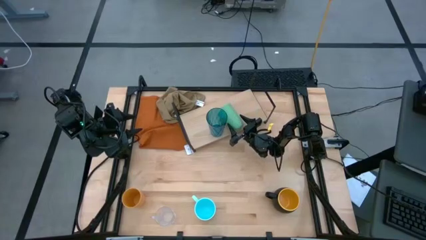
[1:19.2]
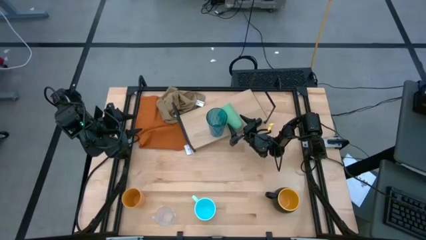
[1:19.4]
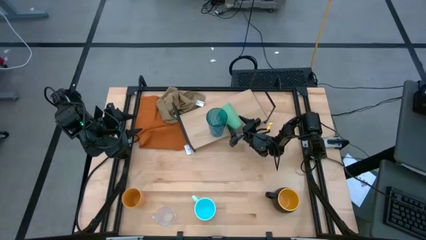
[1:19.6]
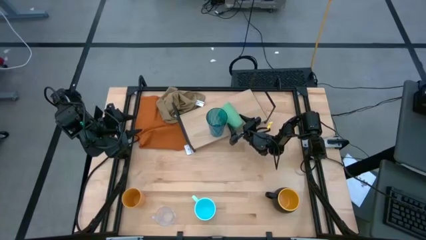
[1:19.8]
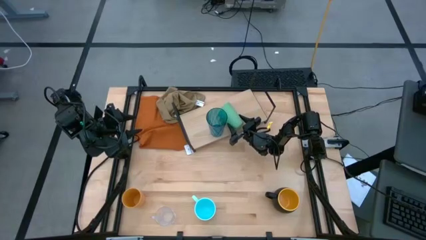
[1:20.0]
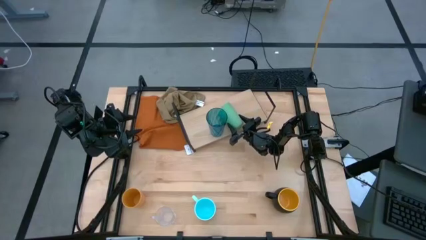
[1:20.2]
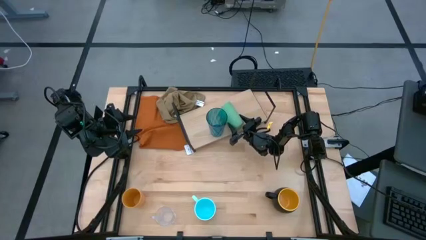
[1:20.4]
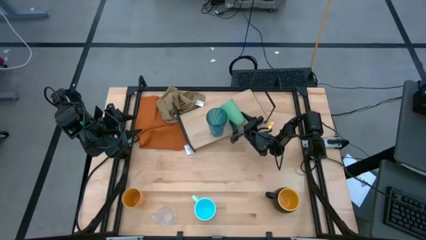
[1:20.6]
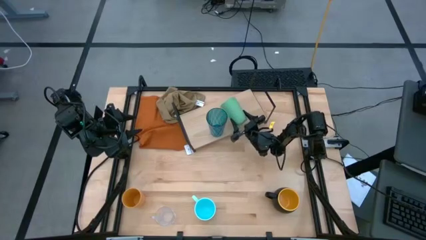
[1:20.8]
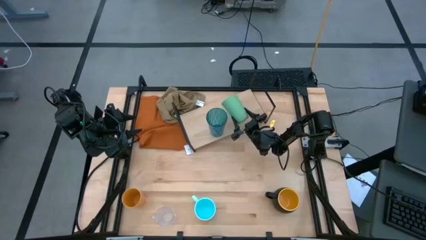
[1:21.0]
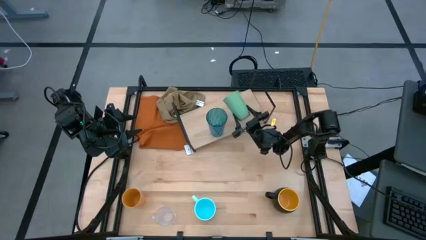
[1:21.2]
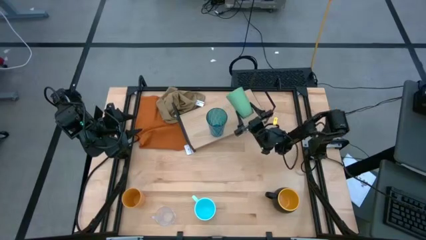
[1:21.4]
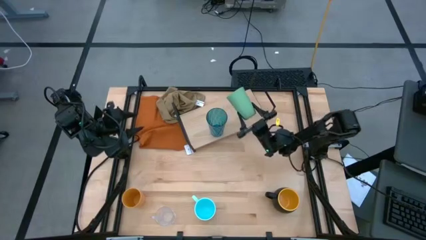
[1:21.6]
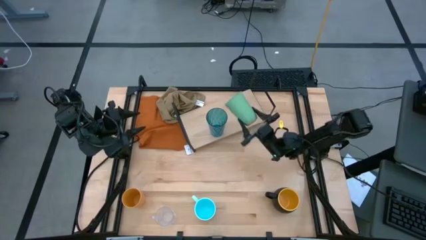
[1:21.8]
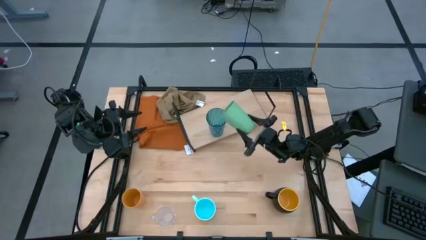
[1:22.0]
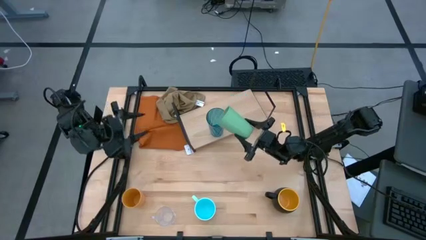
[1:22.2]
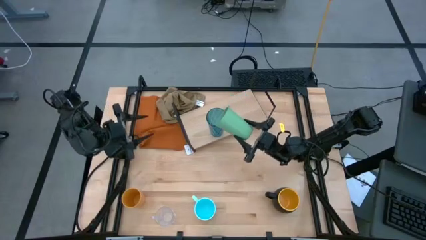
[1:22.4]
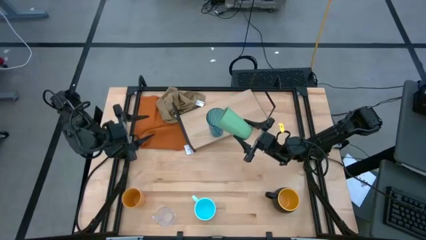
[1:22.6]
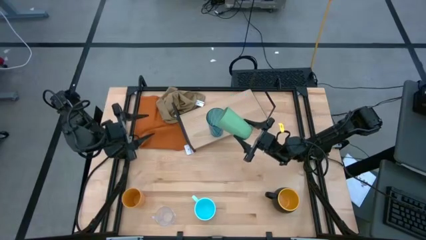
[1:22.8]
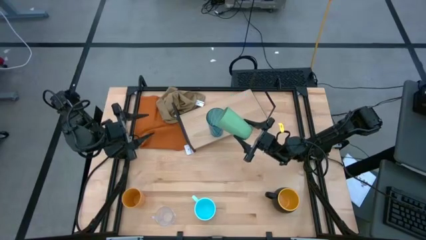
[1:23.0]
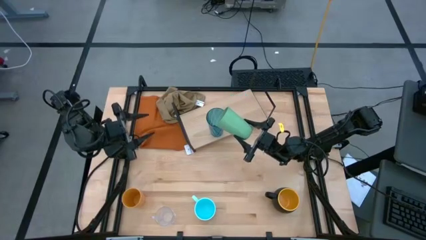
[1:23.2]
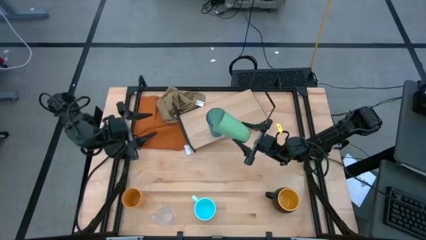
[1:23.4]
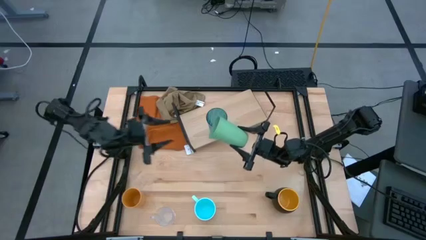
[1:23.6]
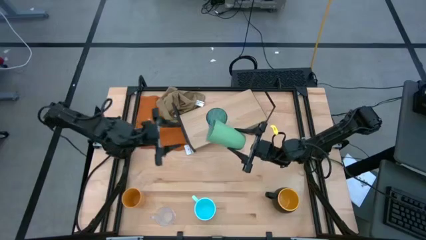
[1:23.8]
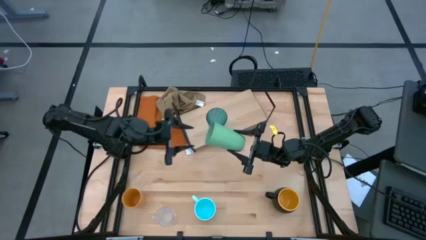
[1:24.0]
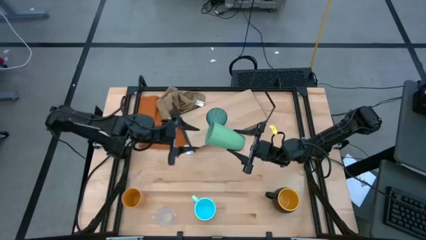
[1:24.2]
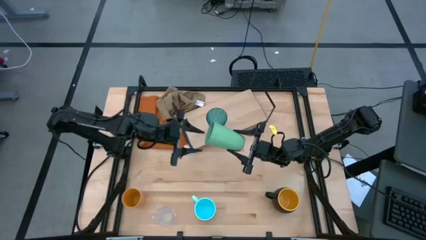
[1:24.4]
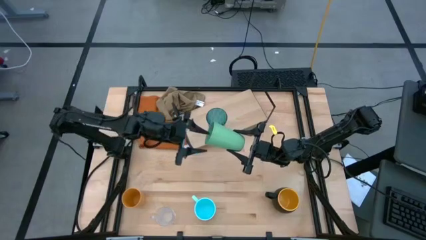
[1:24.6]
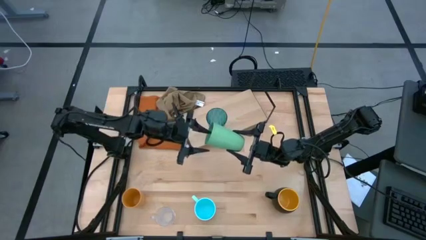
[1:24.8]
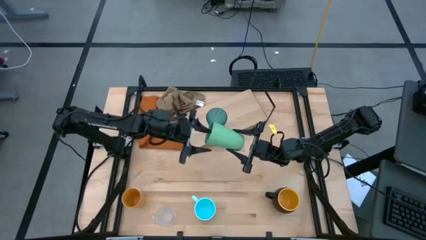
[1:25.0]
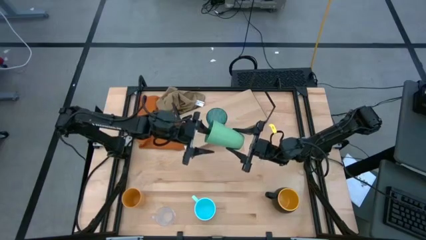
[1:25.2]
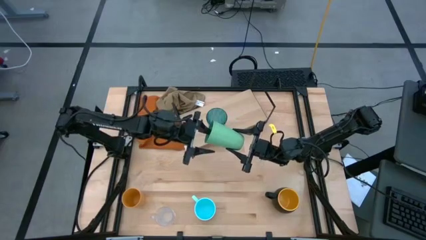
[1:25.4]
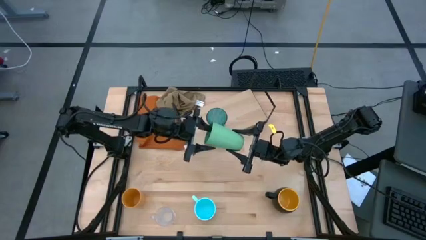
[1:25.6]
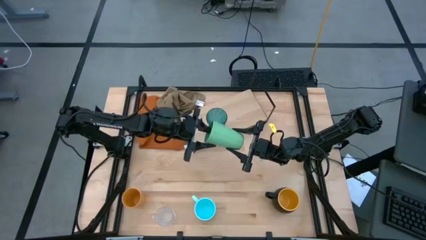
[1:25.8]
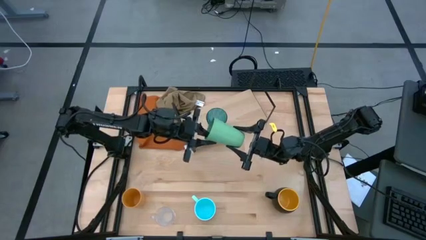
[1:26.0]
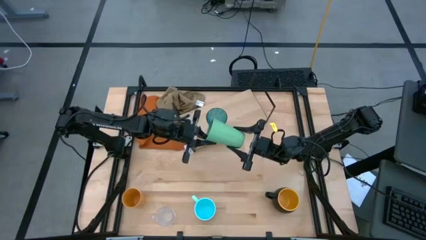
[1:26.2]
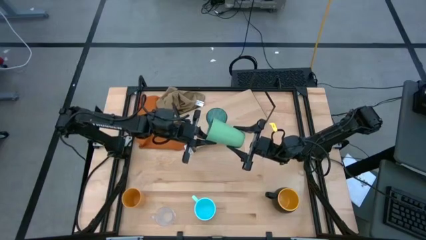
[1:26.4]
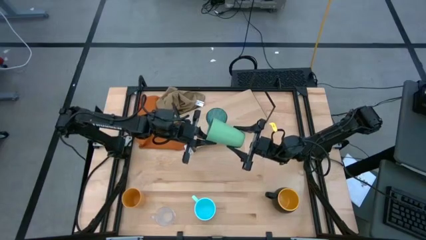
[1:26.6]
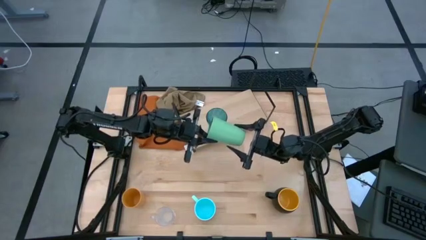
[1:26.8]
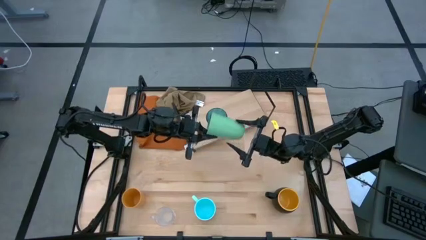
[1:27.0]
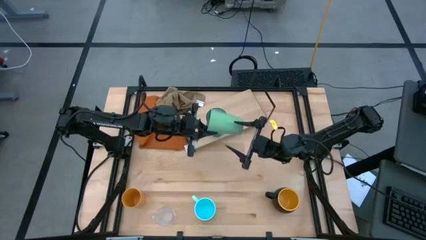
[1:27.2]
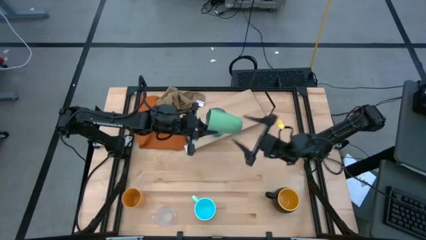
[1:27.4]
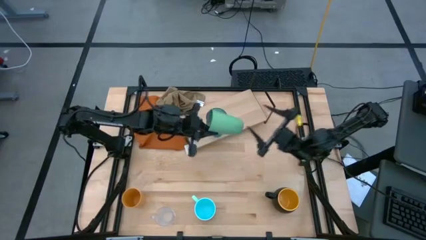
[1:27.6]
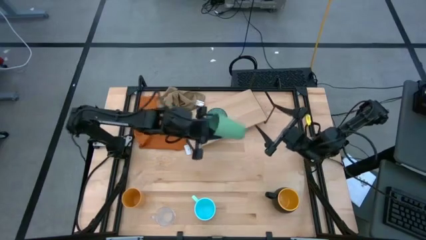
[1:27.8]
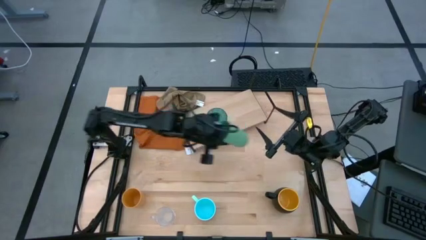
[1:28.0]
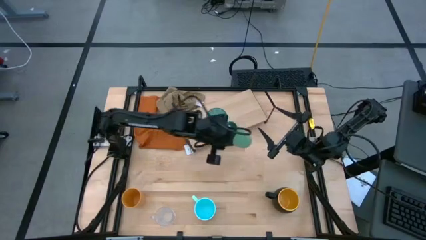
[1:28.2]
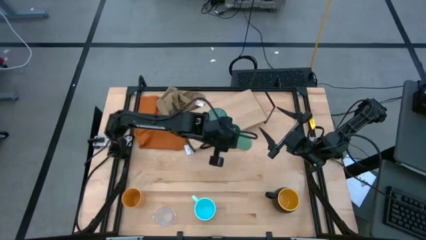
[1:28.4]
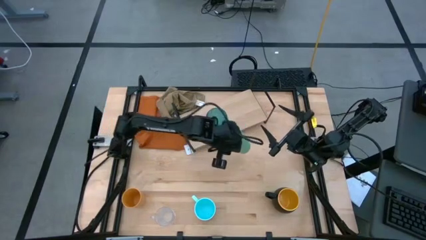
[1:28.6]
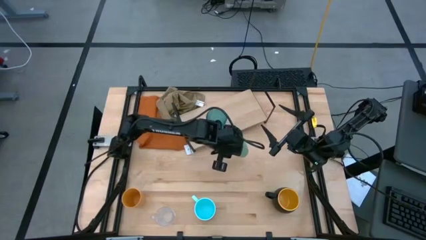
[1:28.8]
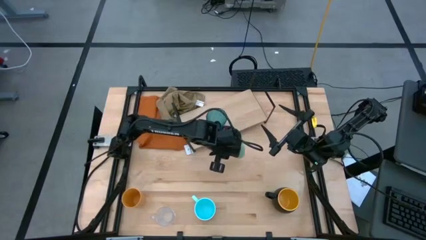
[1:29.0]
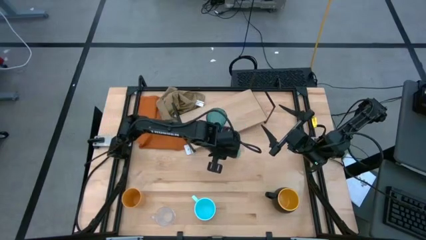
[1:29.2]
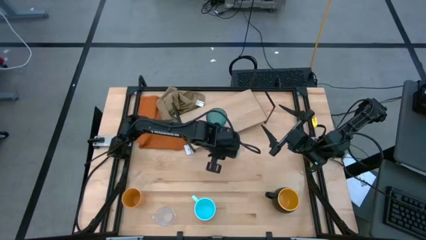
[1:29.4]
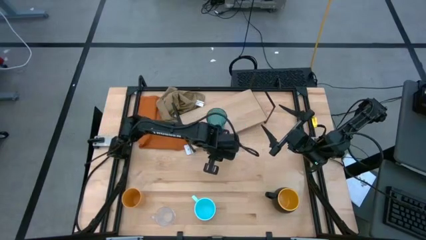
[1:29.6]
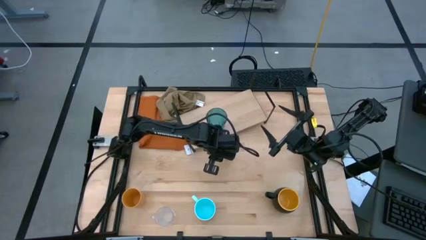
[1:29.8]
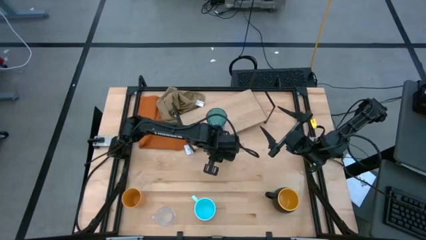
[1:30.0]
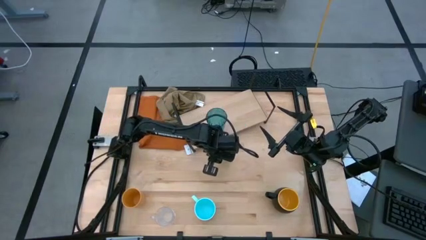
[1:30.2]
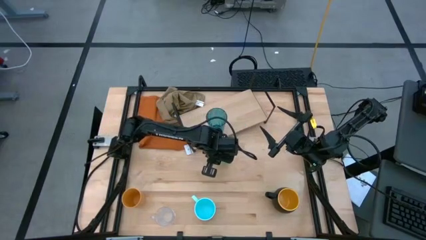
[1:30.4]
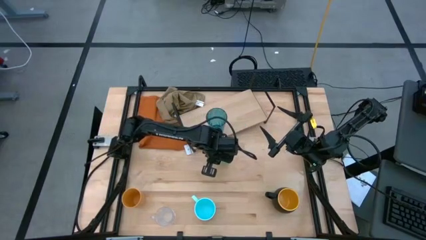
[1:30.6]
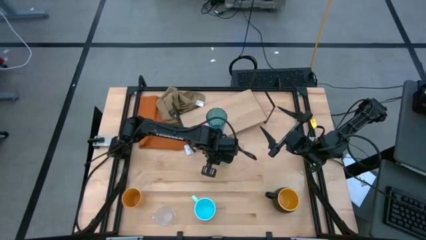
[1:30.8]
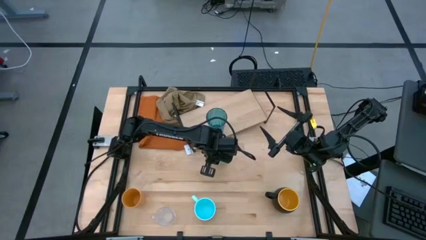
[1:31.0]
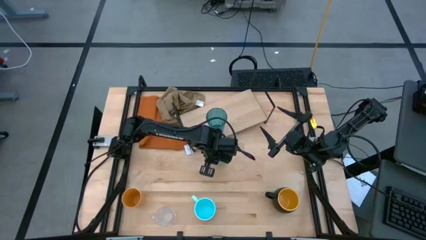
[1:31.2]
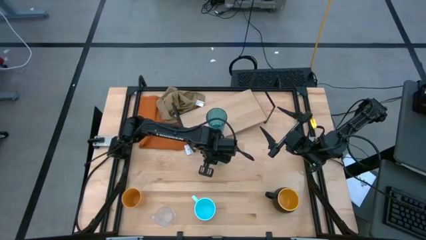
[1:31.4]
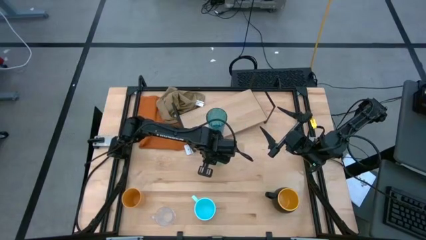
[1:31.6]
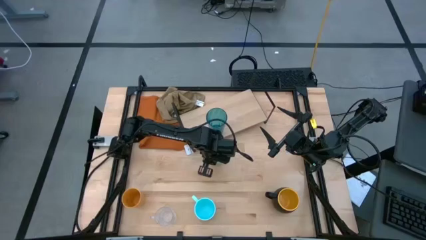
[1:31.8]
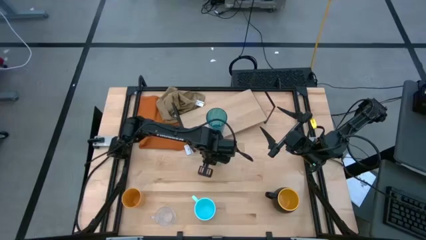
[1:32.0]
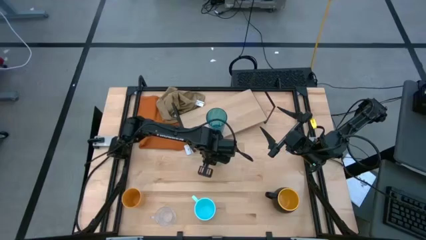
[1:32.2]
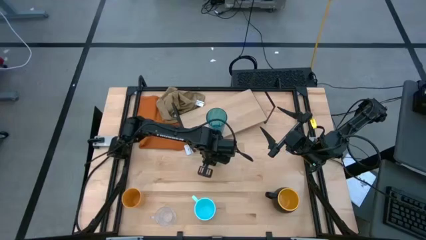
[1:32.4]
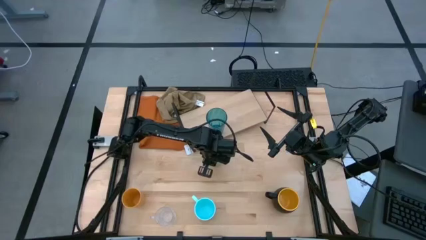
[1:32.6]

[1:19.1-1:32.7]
Task: Stack small to large cups/mugs on shelf
Put the green cup on the shelf
